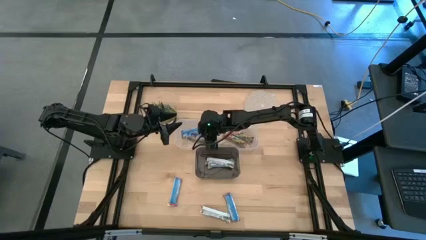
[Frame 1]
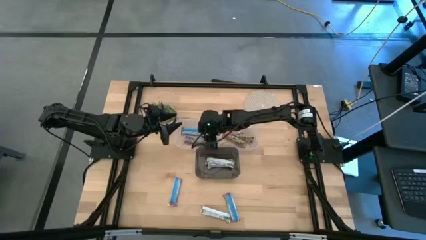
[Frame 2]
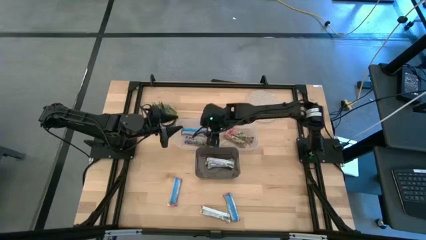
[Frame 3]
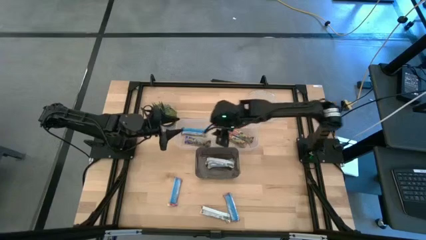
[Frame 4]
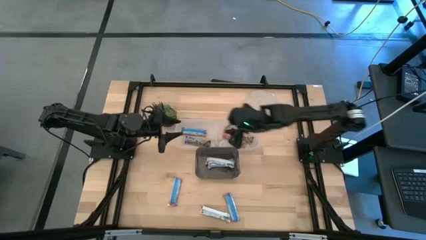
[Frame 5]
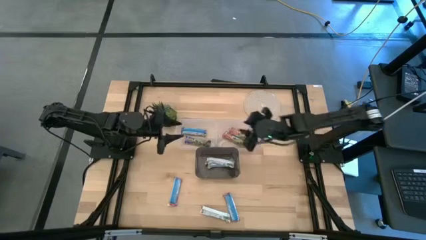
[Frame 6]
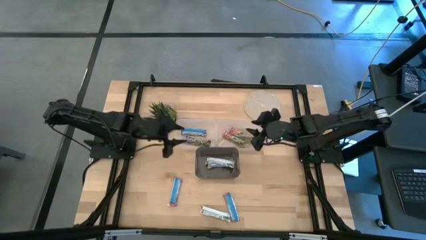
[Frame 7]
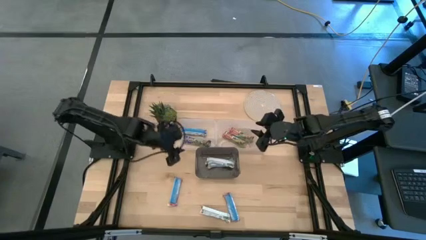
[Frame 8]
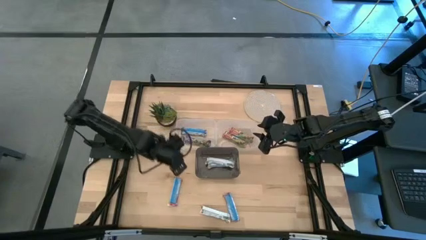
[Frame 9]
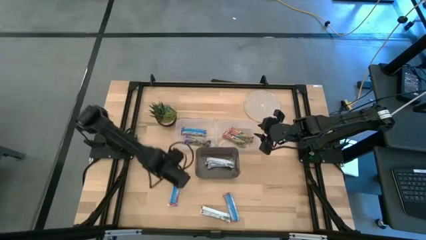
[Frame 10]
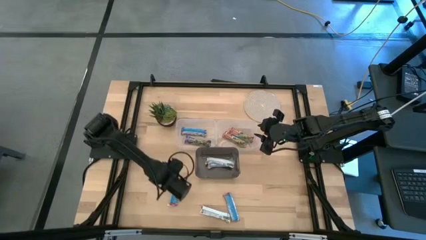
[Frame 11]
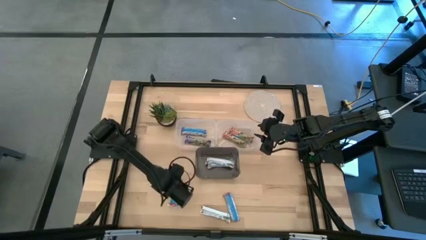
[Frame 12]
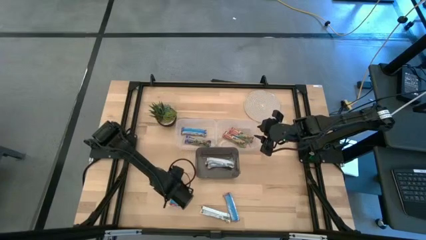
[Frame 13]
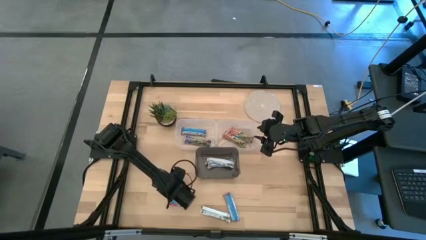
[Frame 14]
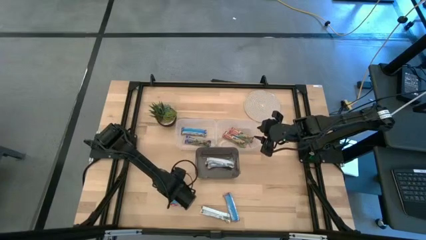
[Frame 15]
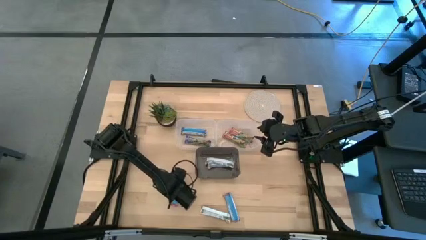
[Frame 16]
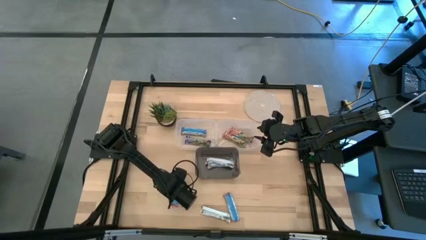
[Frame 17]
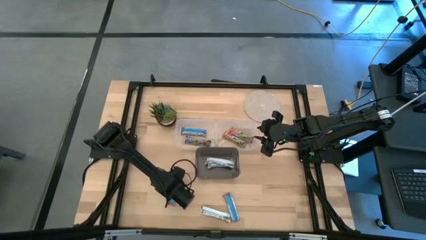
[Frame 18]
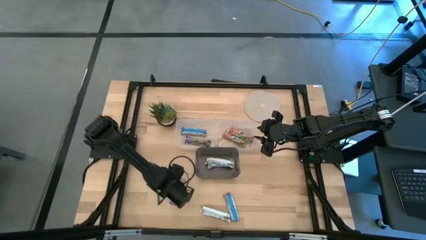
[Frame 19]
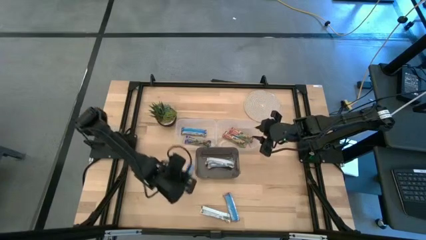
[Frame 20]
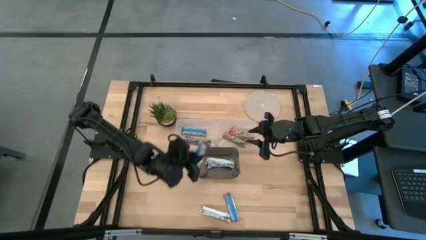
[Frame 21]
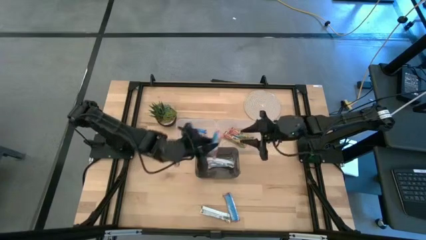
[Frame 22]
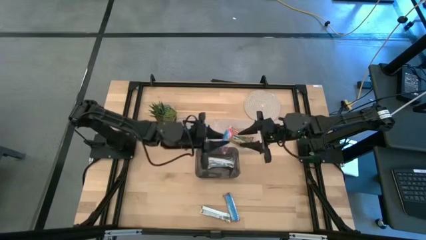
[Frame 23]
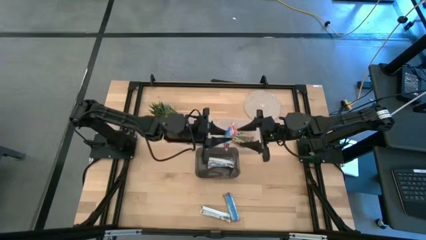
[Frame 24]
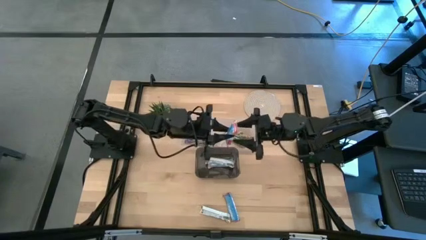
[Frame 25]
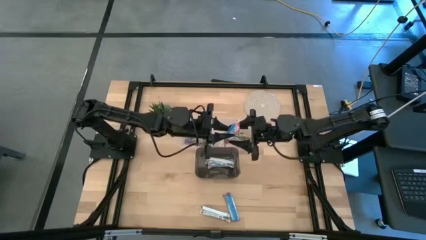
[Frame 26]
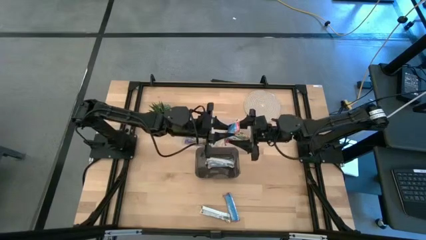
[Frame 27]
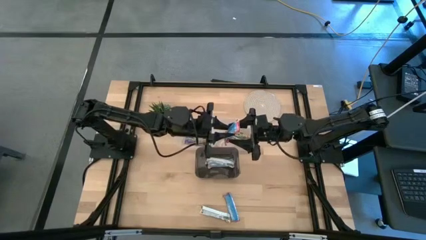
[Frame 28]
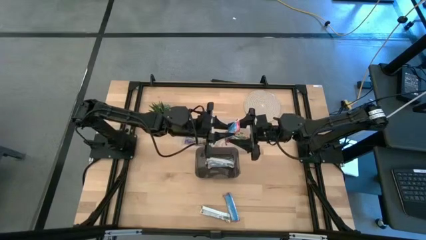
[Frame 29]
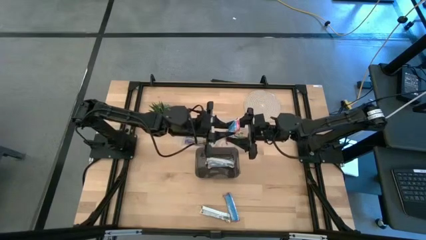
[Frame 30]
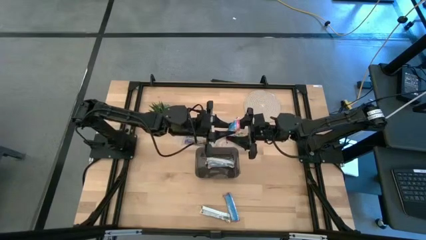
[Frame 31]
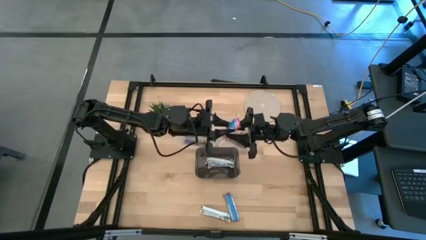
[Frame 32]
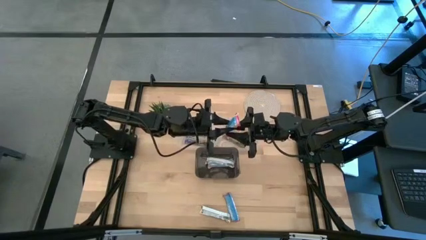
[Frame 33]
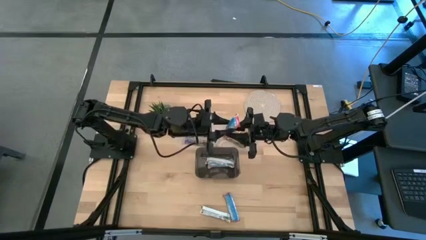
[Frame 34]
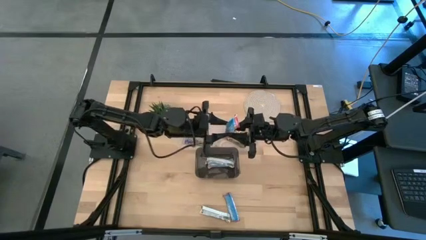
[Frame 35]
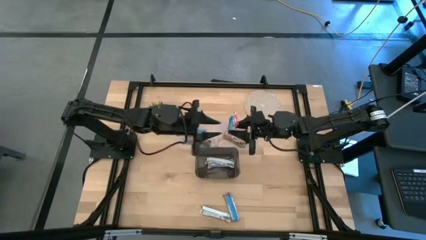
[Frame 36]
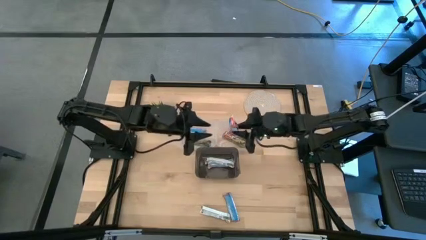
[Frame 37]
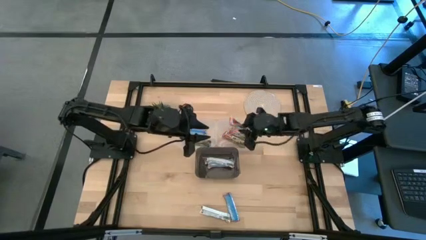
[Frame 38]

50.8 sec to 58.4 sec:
Task: Pick and place Granola Bars by type
Put the red granola bar into the right transparent bin

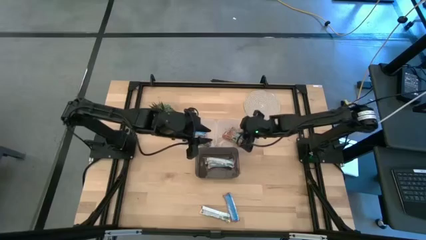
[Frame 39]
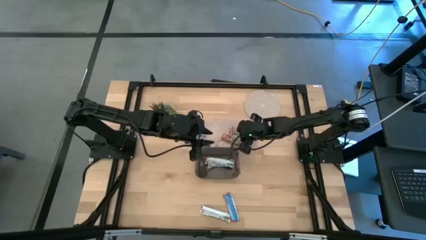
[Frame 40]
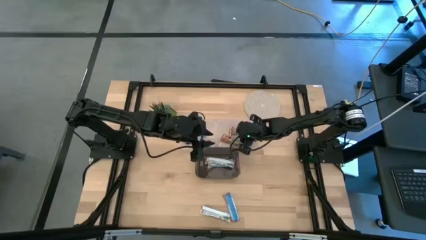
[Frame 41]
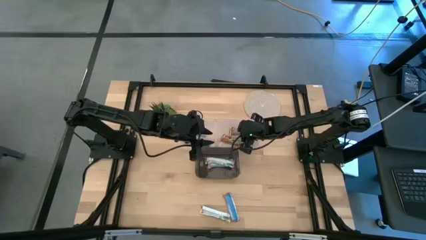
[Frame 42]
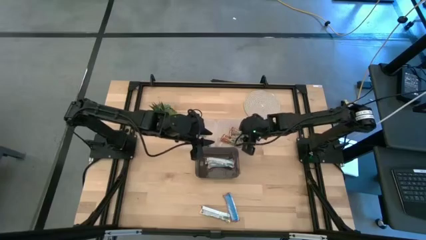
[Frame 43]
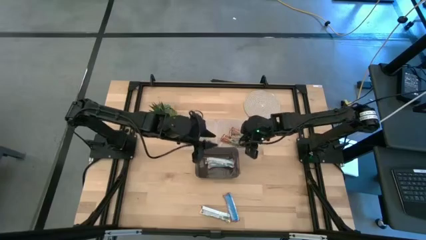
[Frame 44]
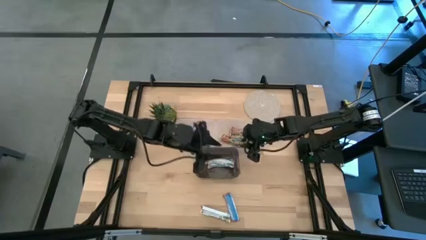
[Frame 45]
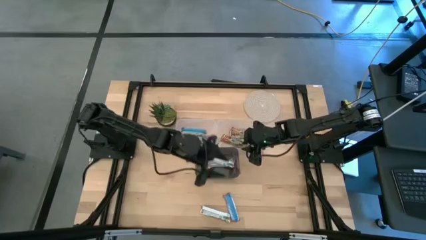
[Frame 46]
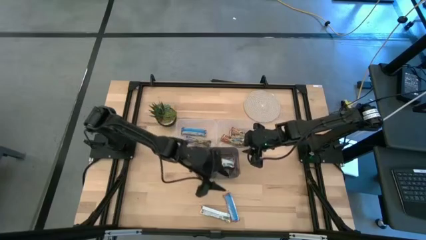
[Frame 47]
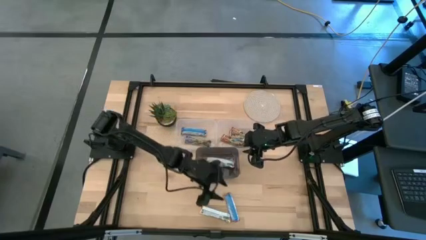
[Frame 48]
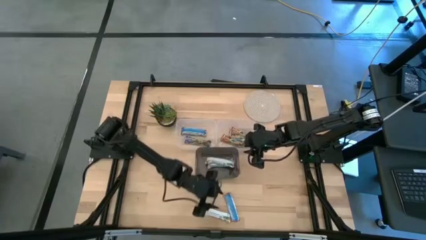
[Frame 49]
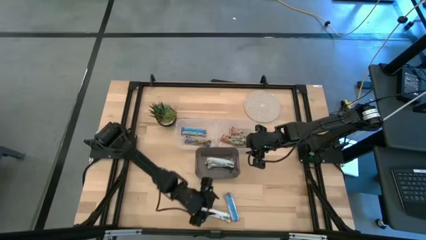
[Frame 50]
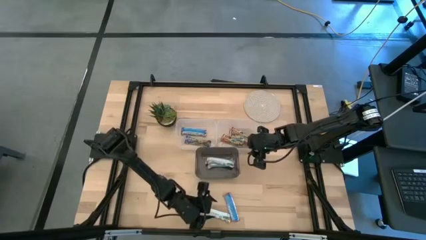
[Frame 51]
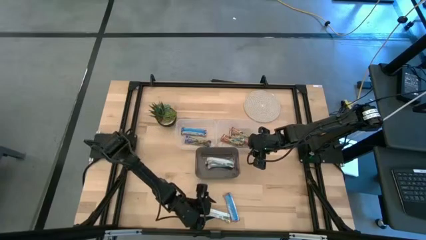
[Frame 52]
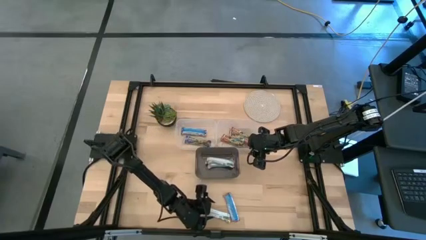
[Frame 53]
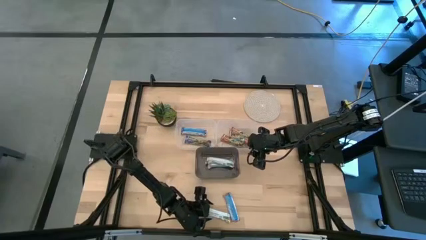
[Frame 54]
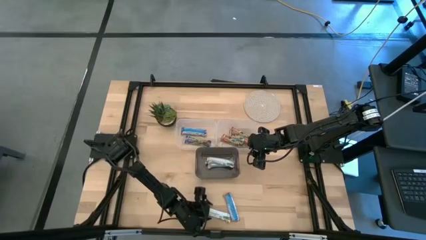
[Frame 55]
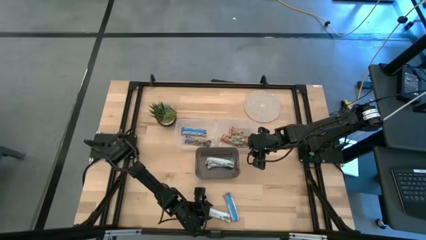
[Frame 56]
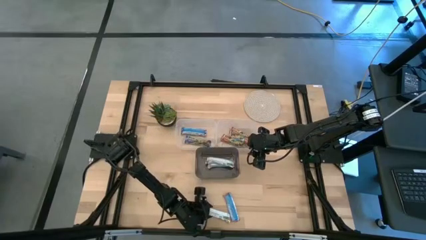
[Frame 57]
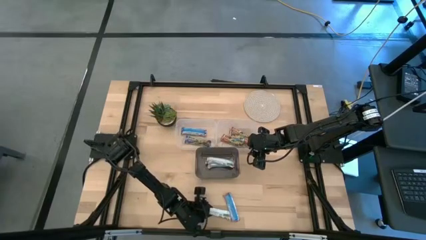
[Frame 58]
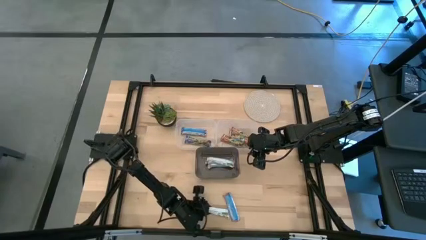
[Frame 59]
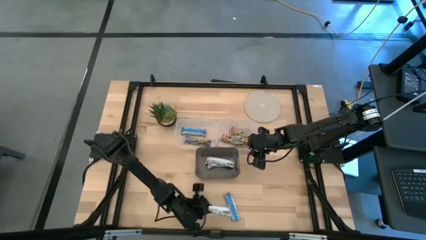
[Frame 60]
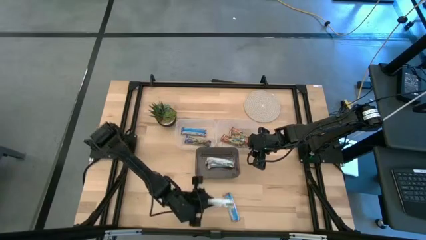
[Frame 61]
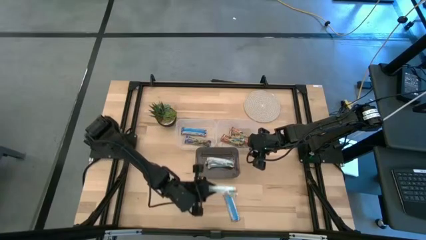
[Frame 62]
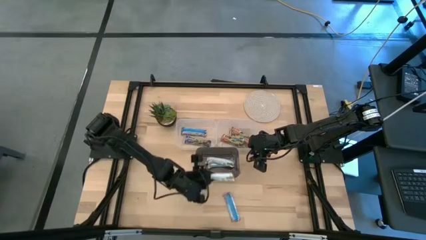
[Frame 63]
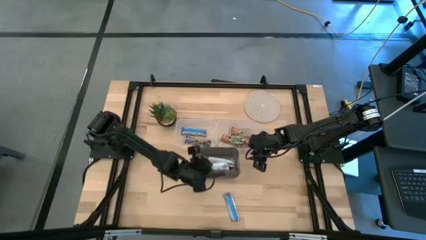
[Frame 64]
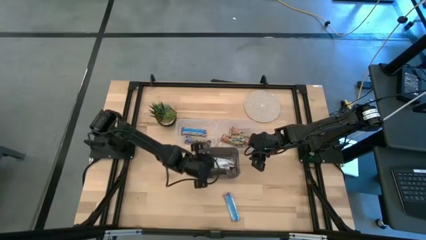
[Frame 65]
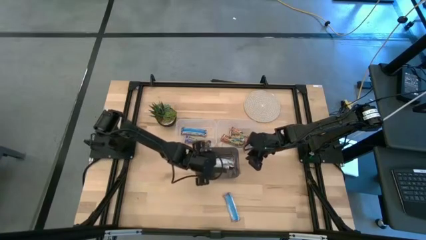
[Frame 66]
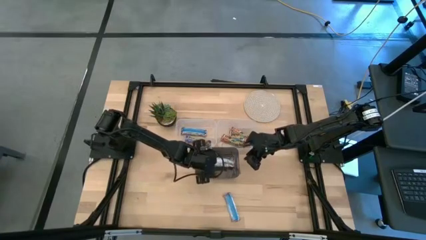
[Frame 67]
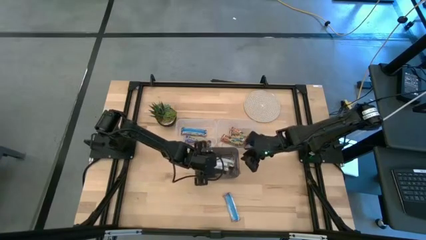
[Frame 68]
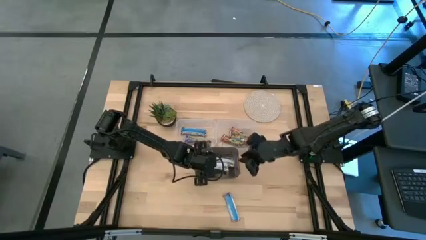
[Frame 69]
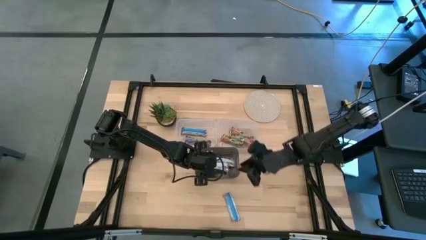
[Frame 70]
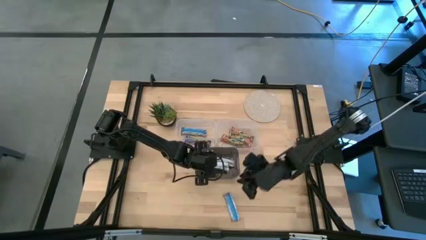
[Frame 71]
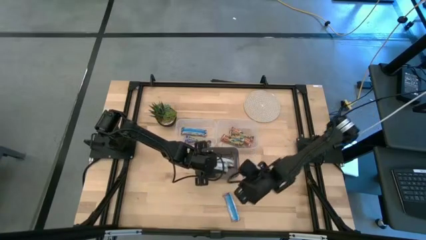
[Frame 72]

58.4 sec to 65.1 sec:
Put the yellow granola bar into the black bin

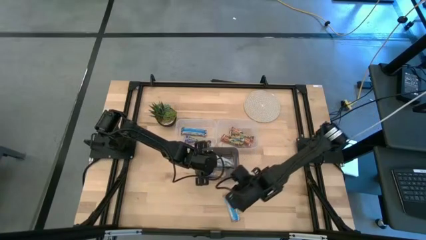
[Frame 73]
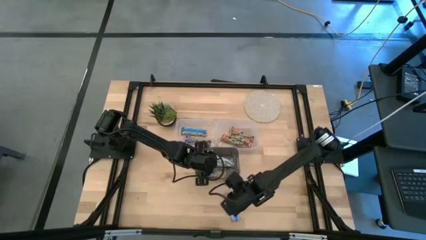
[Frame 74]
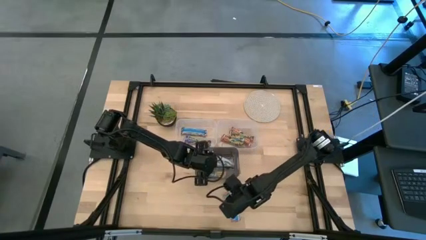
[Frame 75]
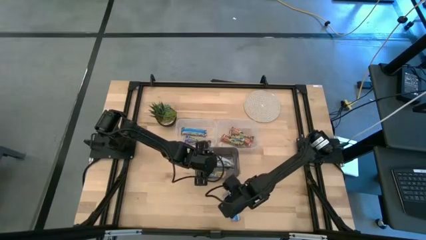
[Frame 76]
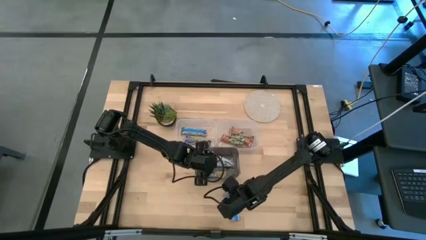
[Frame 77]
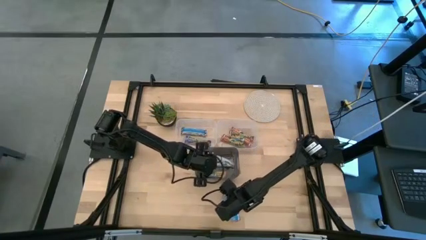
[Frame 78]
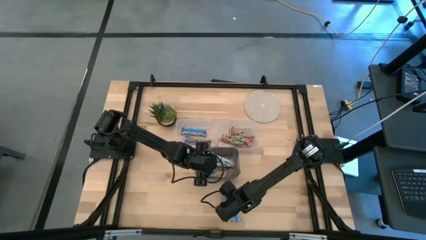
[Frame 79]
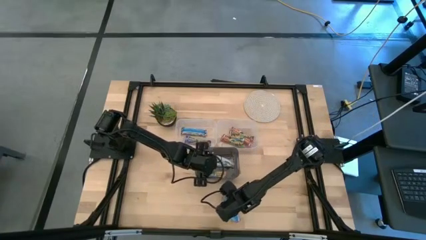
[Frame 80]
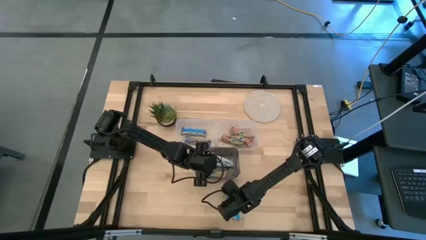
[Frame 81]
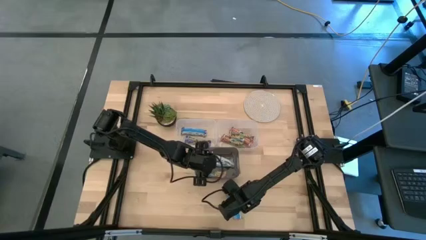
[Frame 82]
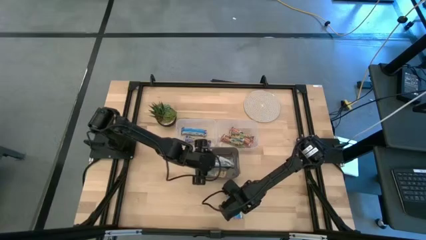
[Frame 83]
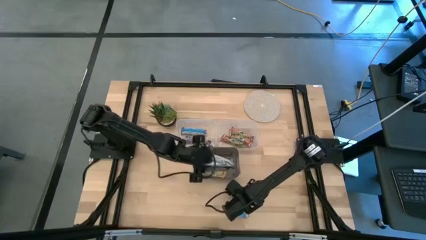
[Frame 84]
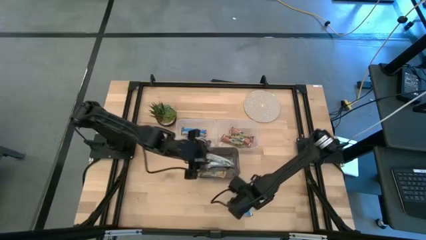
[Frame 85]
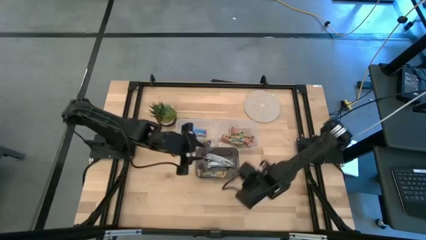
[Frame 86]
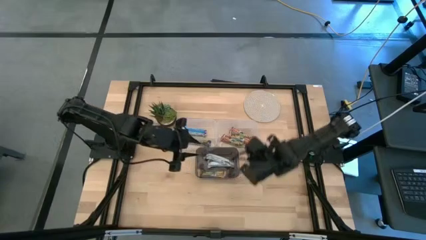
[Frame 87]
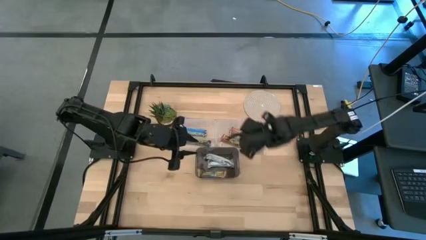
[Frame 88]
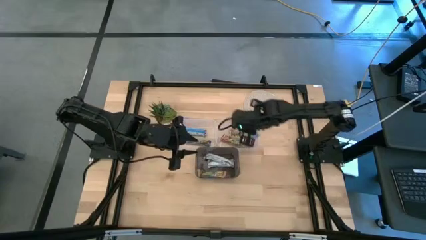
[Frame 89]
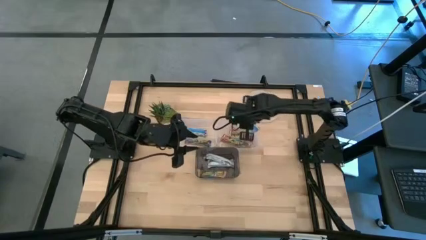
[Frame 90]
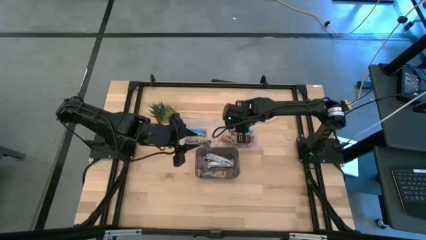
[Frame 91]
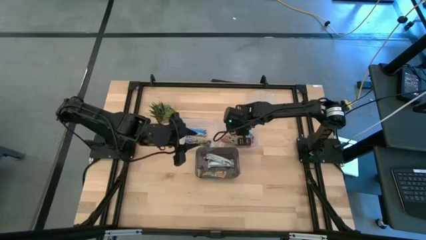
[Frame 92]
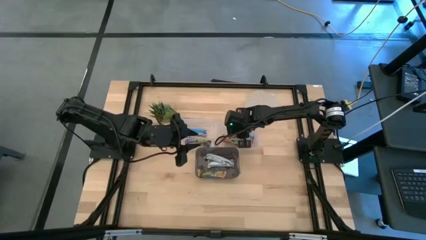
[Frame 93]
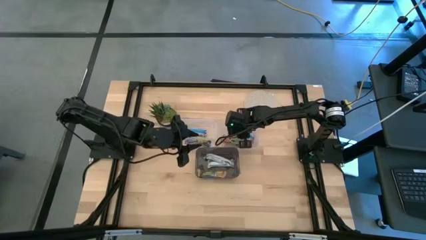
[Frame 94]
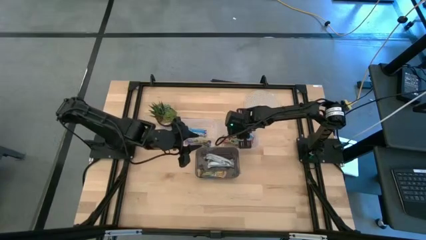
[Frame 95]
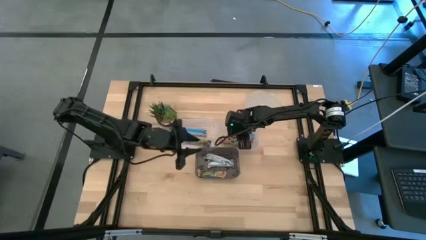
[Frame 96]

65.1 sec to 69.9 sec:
Put the red granola bar into the right transparent bin
